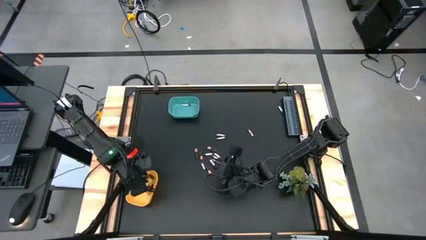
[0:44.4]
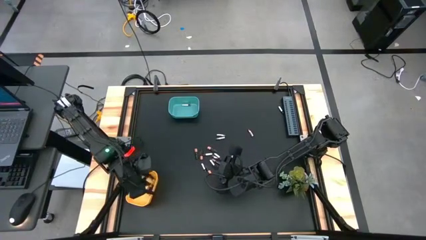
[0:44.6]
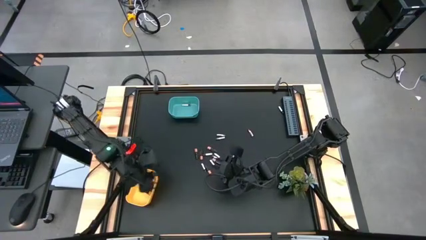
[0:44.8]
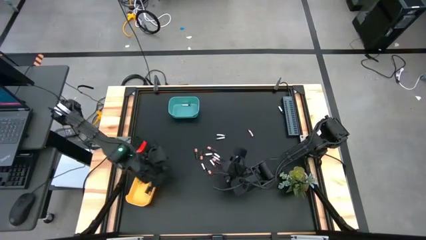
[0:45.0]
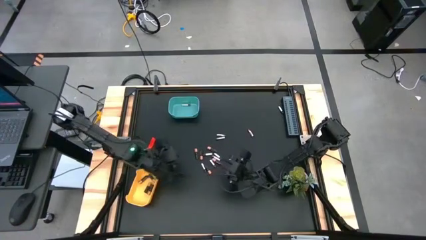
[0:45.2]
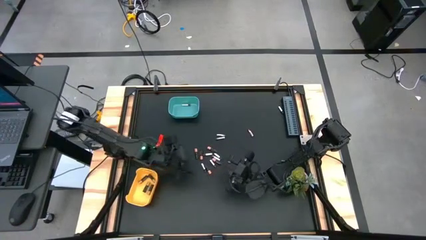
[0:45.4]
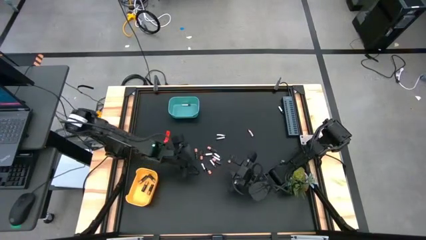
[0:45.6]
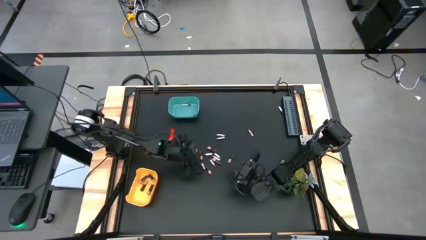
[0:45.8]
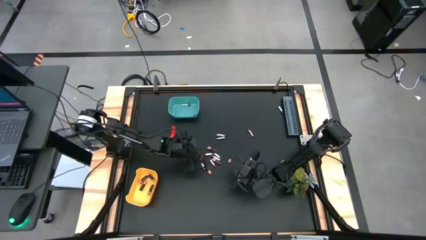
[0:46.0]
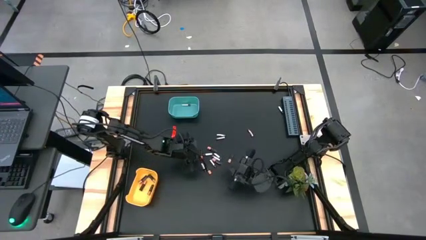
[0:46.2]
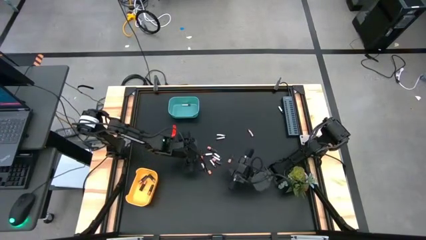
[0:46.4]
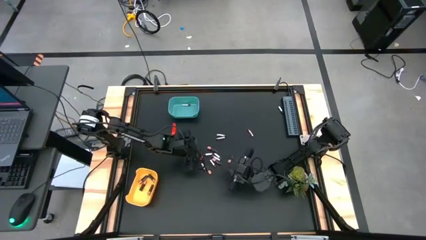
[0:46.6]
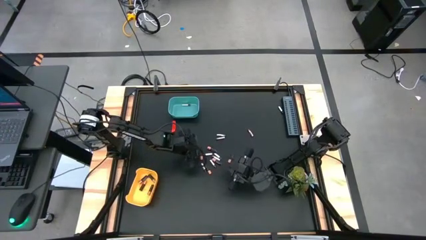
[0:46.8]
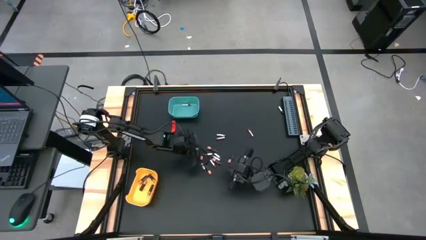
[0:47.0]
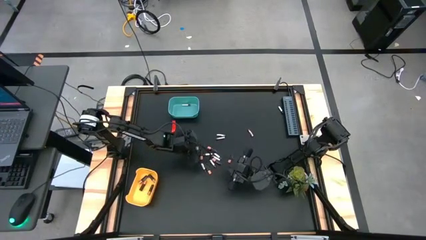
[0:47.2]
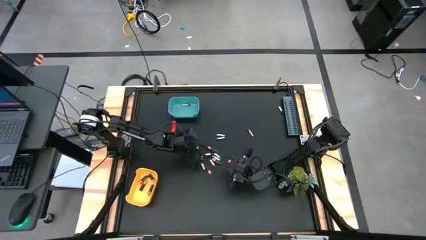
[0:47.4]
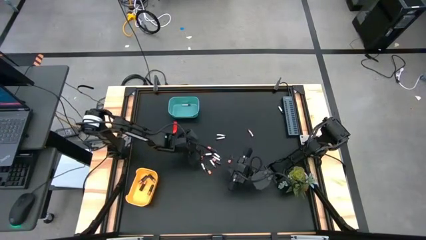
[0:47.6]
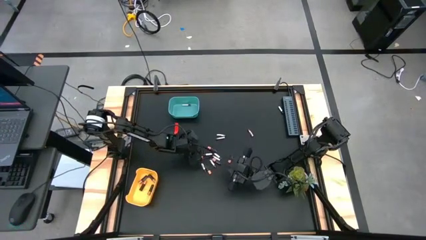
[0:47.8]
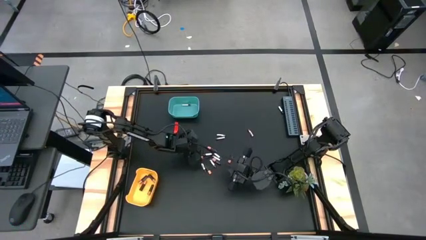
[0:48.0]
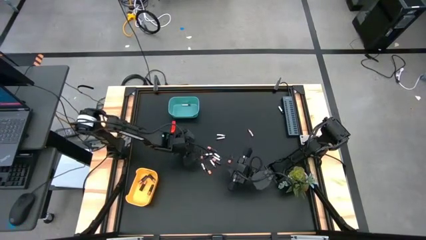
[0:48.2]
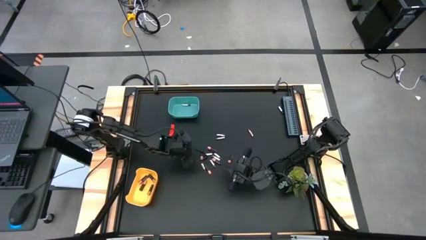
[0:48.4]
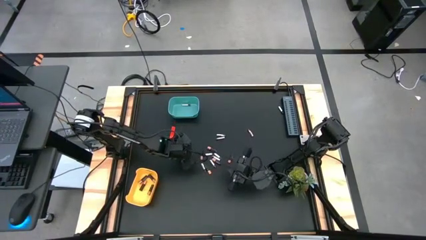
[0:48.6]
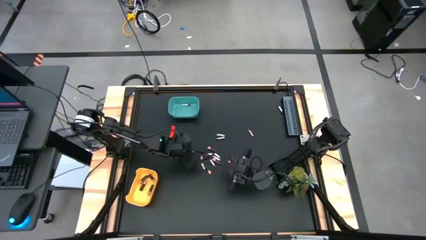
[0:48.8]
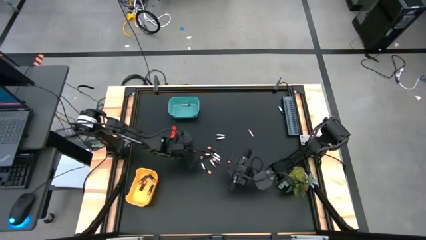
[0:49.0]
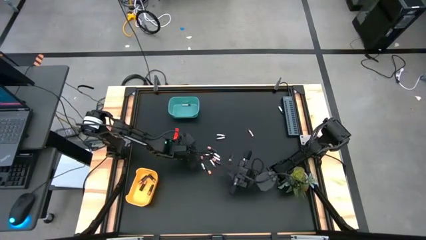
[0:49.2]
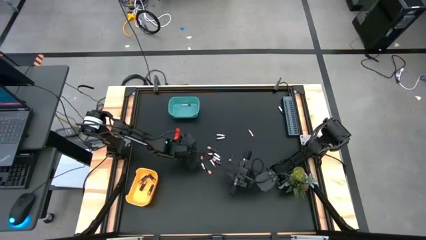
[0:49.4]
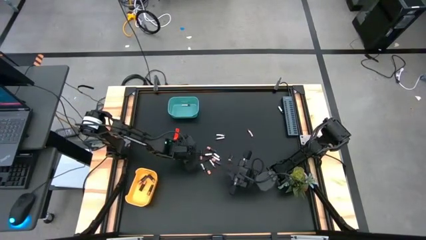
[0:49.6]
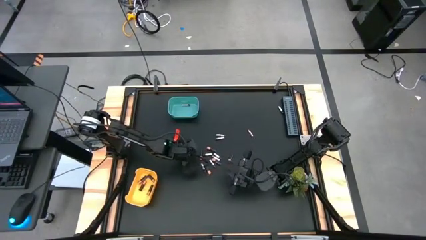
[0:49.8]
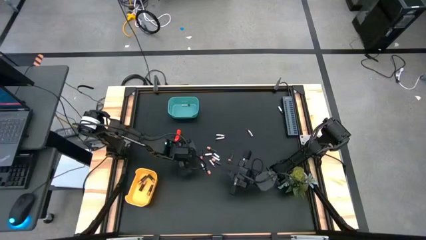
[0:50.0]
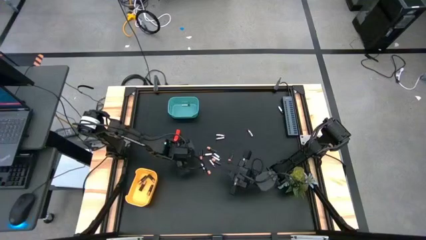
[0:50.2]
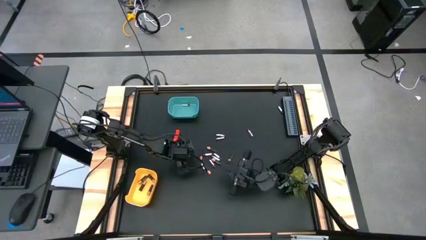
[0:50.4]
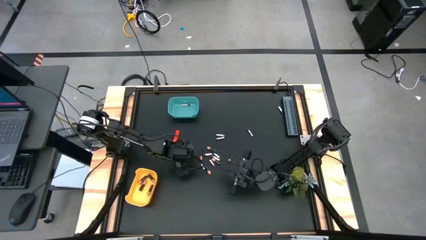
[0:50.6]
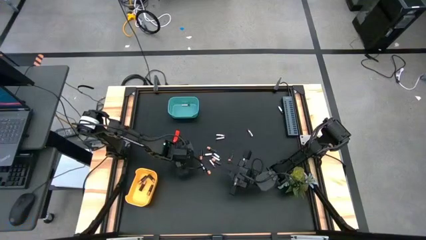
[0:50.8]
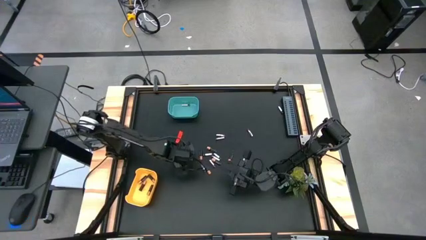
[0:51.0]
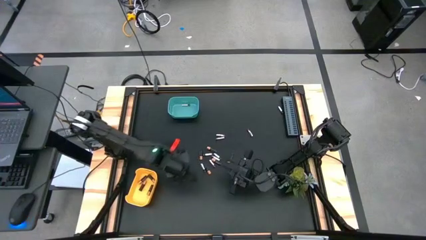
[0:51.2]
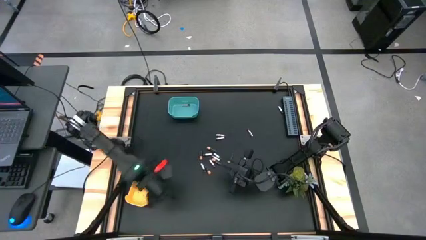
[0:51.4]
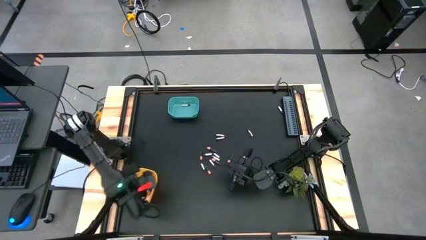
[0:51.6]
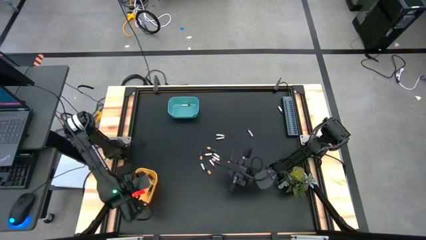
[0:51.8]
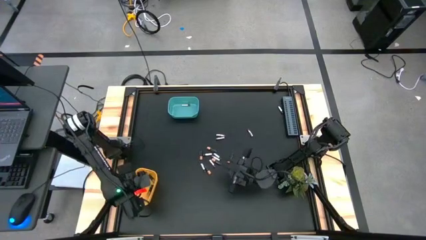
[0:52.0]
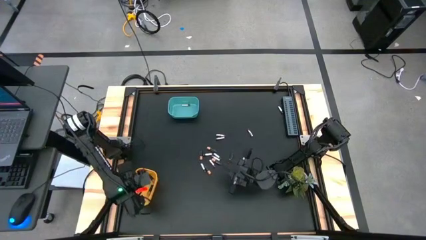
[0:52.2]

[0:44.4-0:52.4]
Task: Sort batteries
Put the black battery into the yellow bin

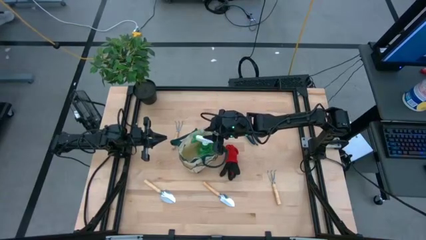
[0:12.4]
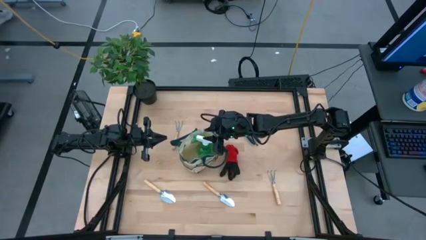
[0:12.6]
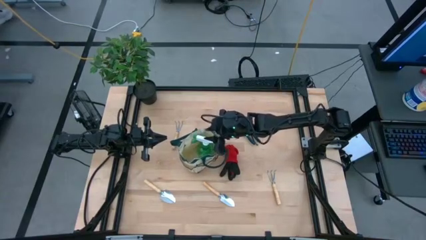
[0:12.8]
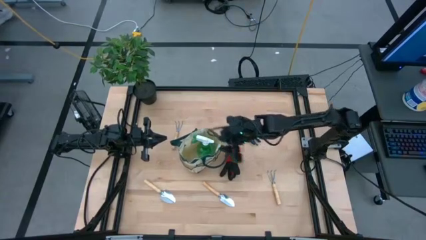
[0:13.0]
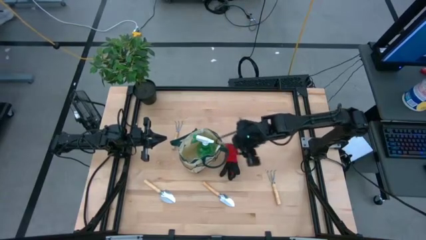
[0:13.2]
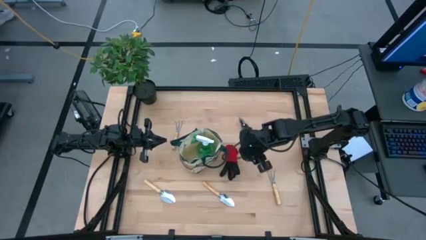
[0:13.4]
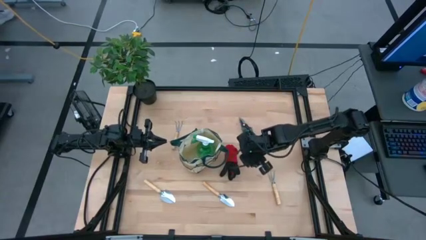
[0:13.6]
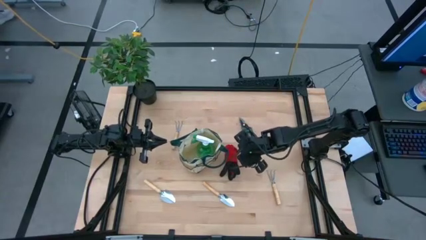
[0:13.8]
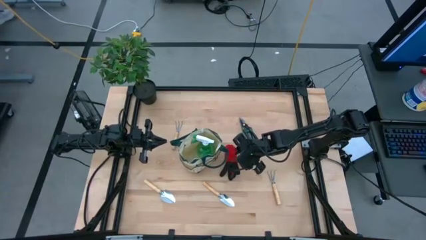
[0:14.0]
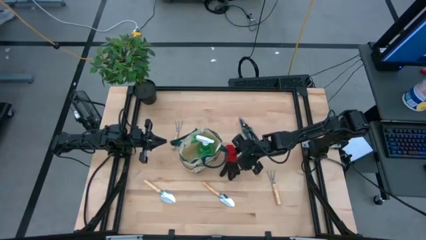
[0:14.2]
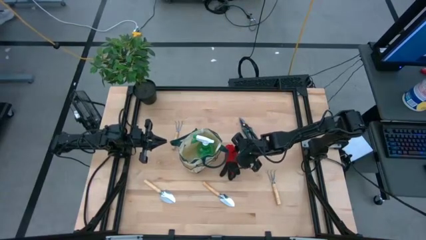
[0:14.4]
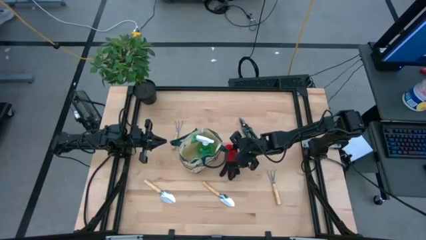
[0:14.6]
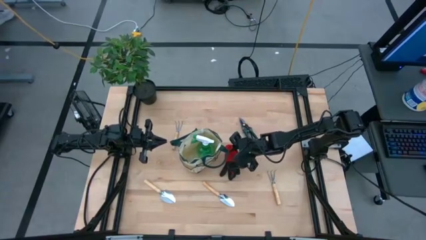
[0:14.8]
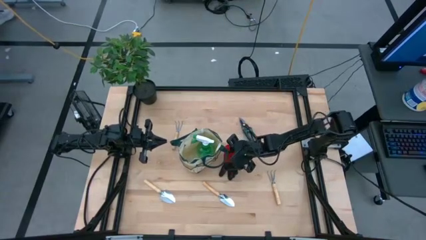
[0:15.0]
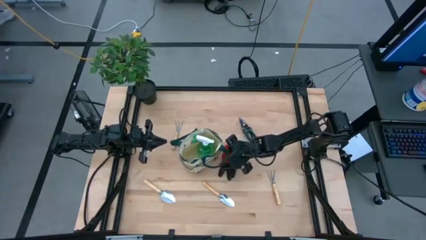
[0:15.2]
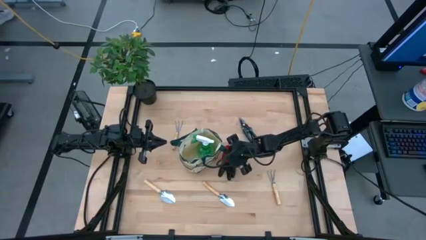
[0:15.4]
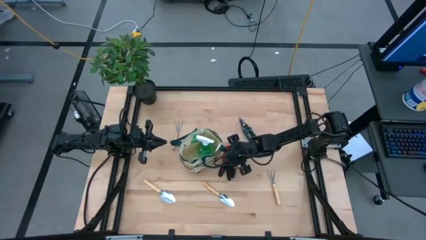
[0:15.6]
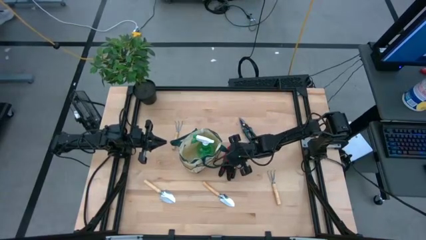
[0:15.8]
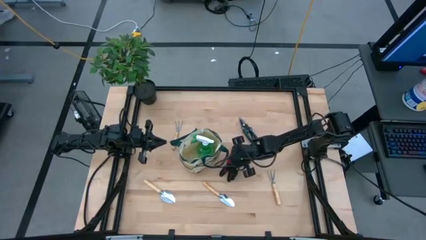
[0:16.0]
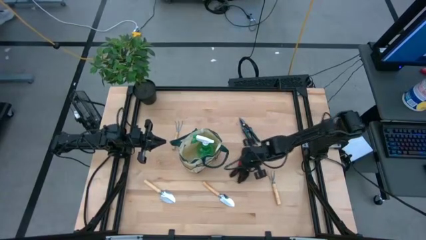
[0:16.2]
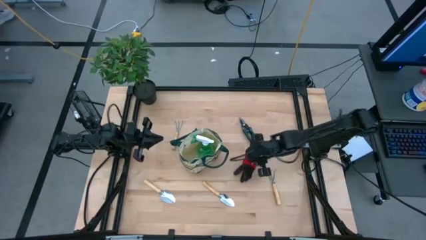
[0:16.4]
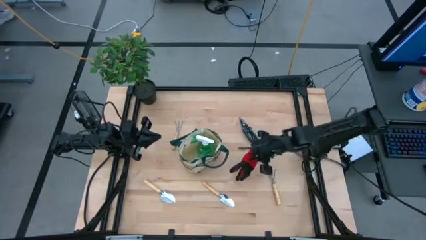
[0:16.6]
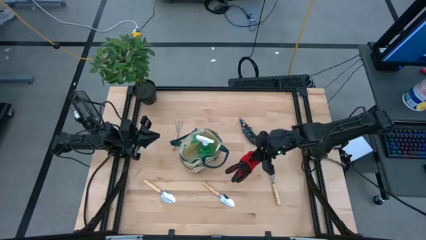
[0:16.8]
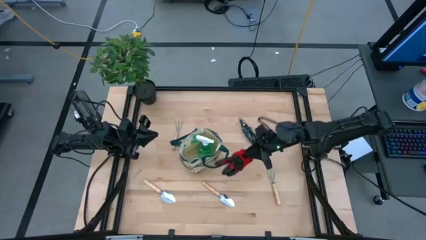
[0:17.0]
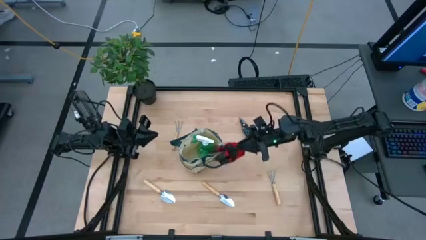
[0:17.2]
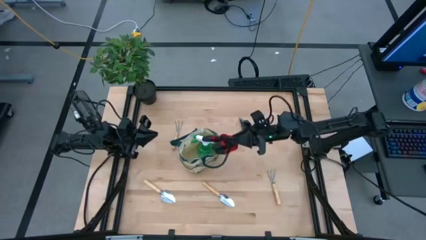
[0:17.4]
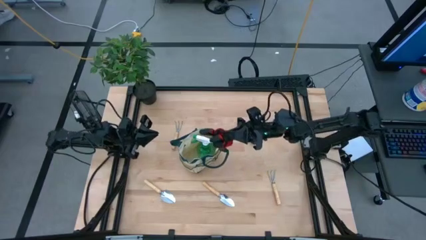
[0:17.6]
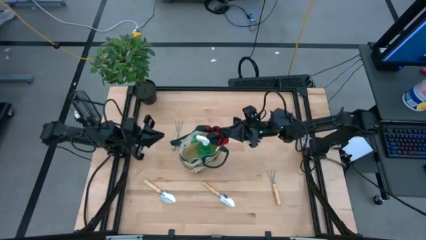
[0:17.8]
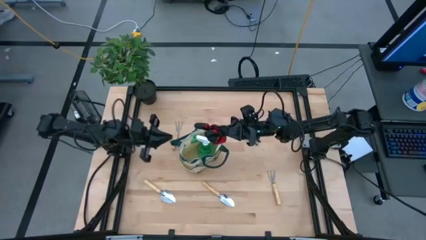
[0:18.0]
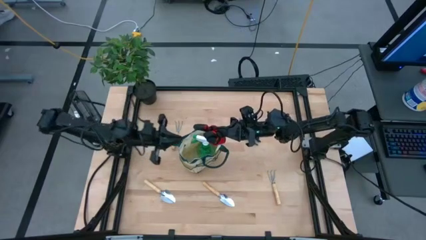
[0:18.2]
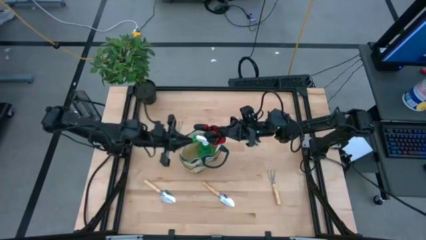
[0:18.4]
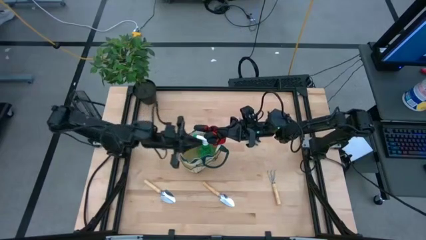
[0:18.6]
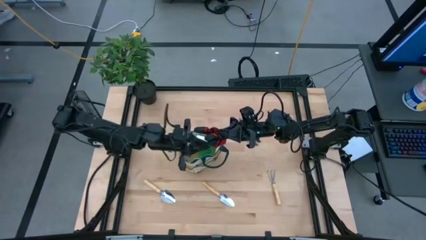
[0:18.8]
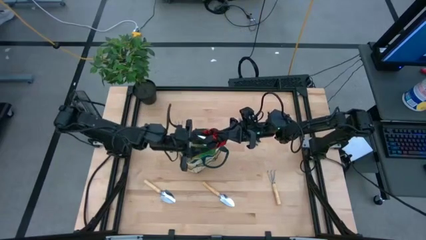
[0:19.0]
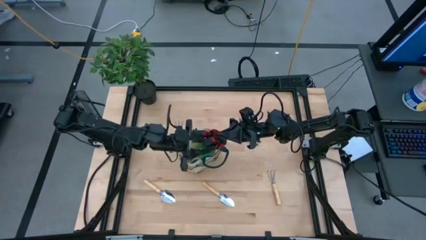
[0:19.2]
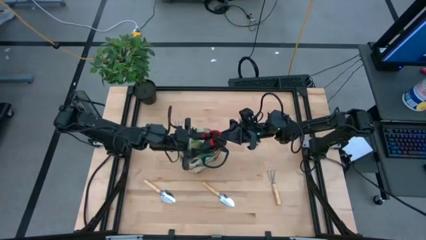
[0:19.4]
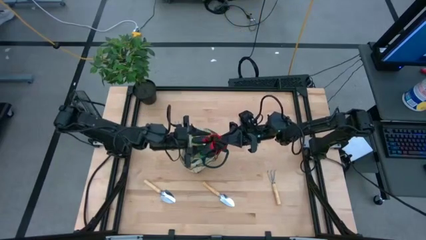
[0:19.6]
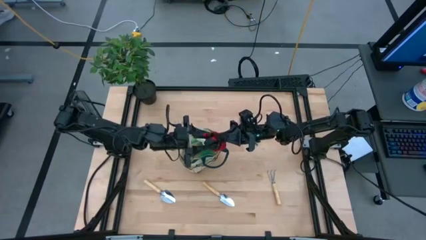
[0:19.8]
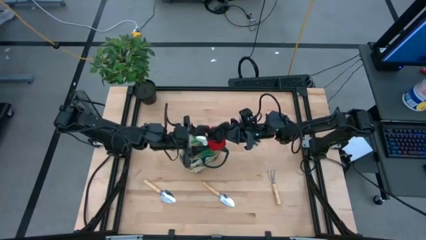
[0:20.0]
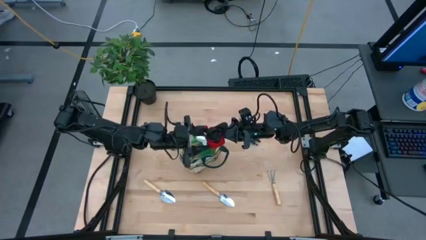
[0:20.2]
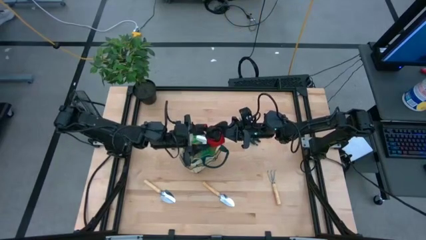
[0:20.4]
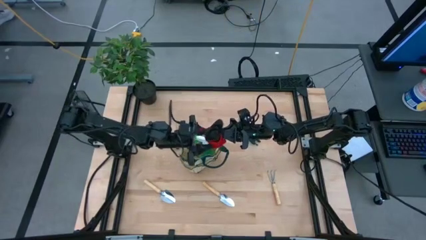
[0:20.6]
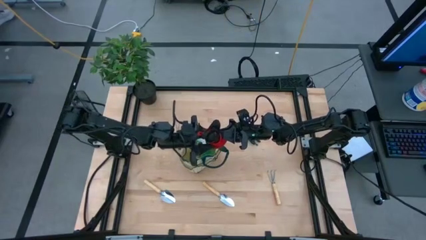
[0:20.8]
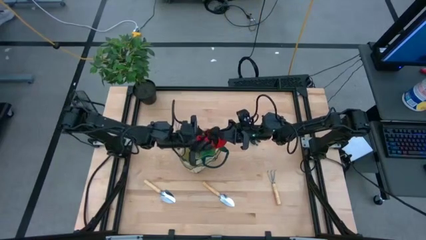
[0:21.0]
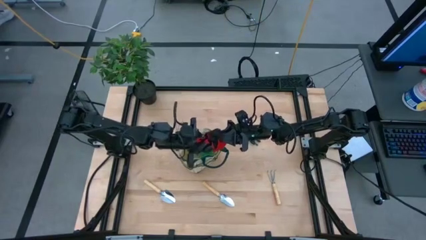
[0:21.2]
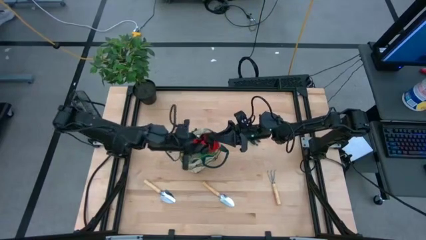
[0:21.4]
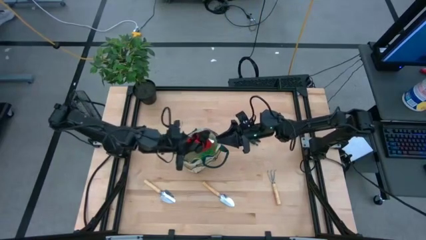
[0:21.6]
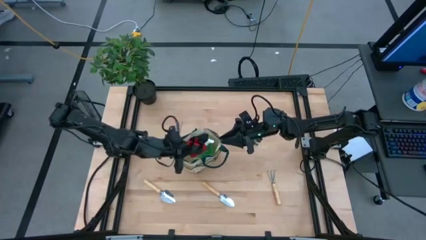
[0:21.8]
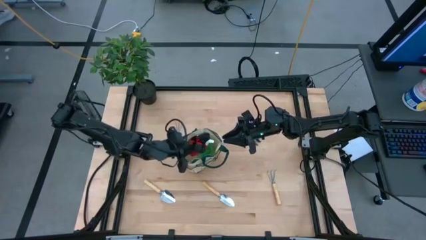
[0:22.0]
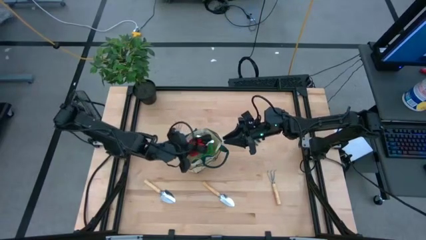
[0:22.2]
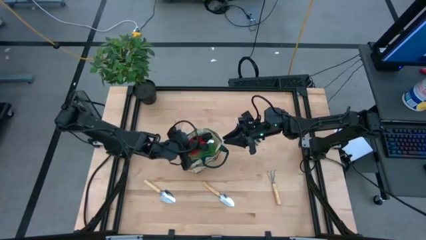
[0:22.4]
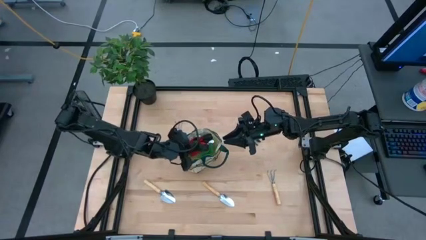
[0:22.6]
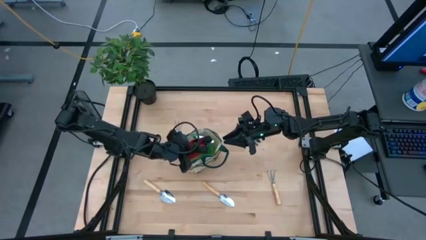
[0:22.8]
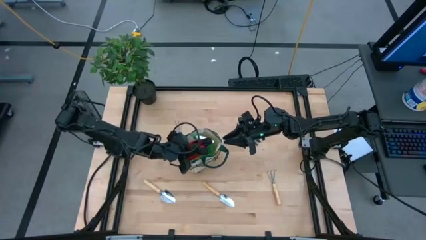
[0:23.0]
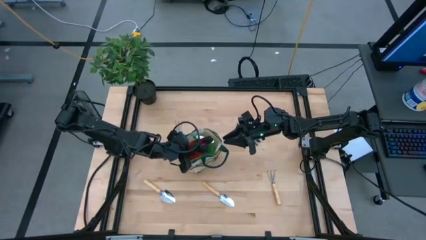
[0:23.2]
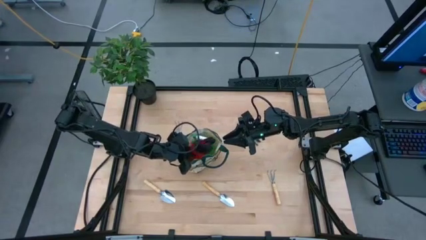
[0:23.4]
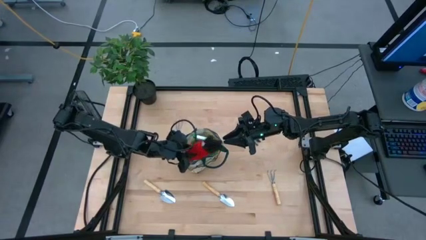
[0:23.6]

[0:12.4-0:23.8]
Task: Pick & Place Garden tools in Gardening bag
Put the red gloves into the gardening bag
